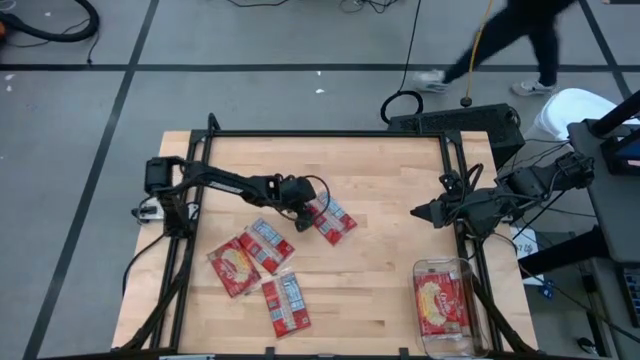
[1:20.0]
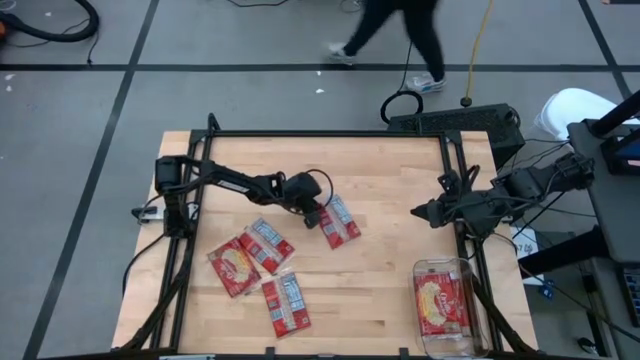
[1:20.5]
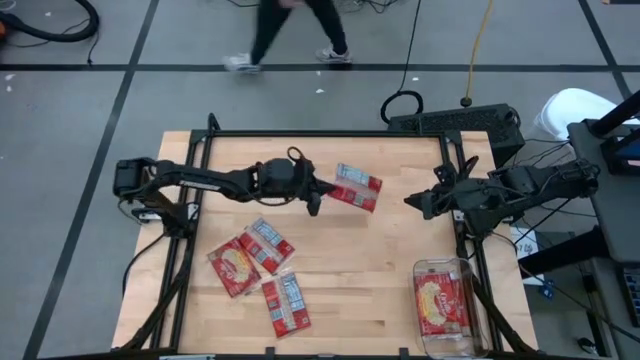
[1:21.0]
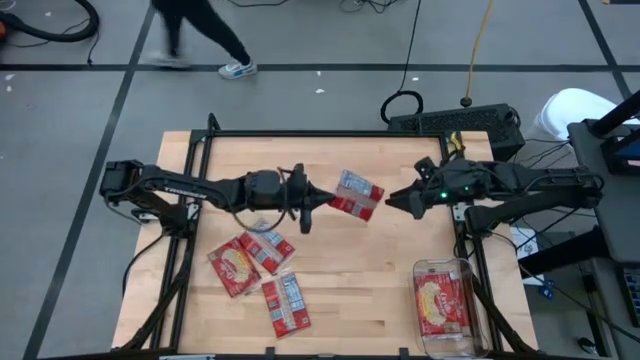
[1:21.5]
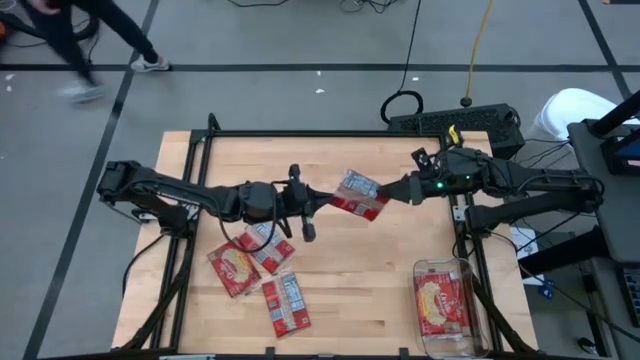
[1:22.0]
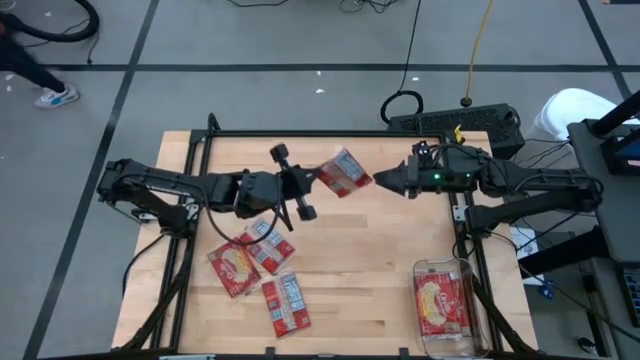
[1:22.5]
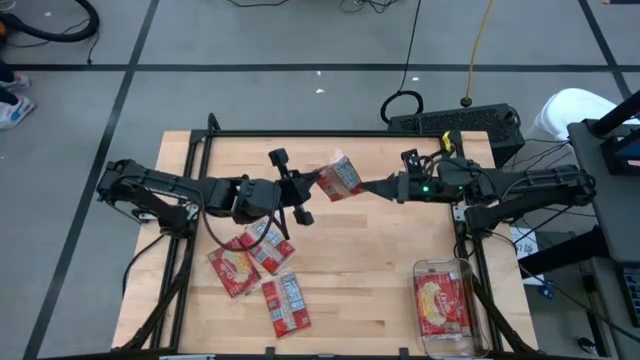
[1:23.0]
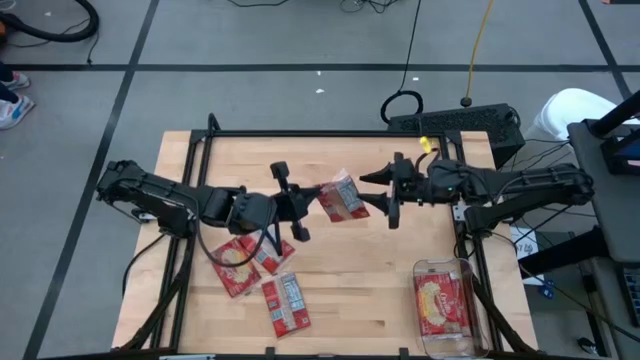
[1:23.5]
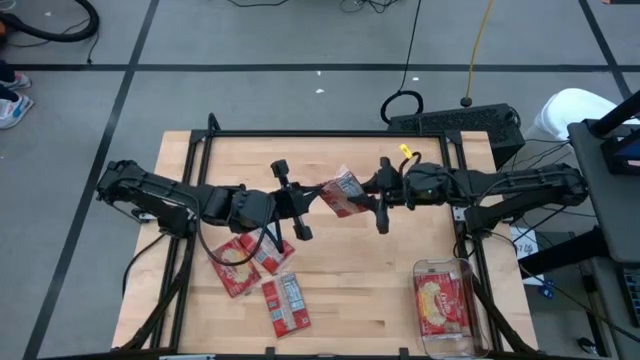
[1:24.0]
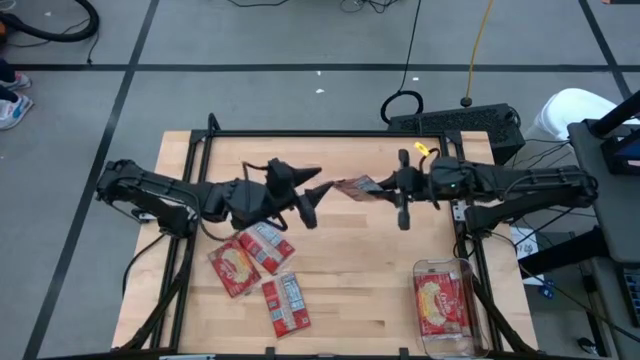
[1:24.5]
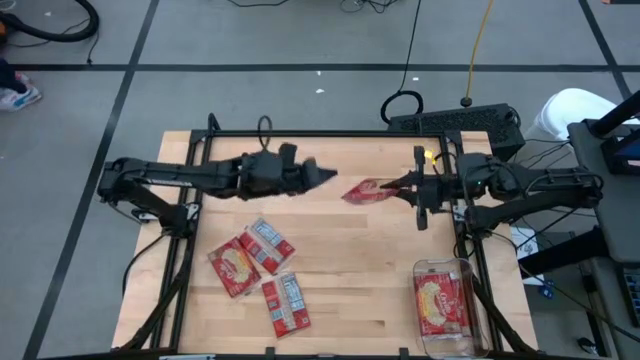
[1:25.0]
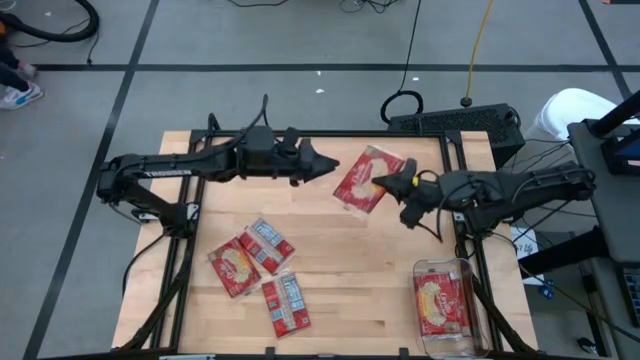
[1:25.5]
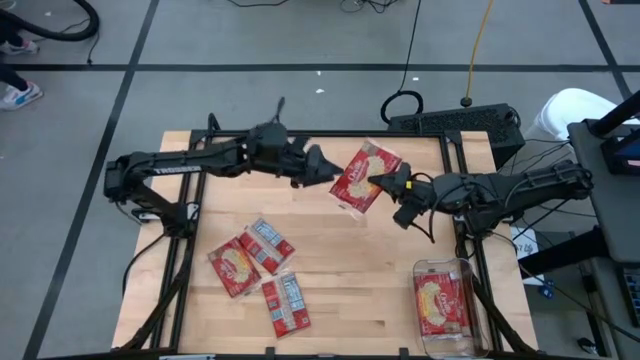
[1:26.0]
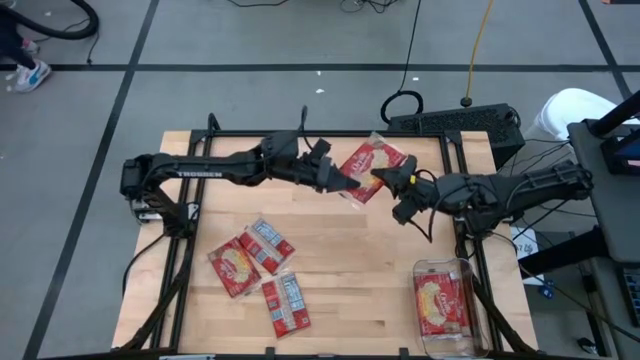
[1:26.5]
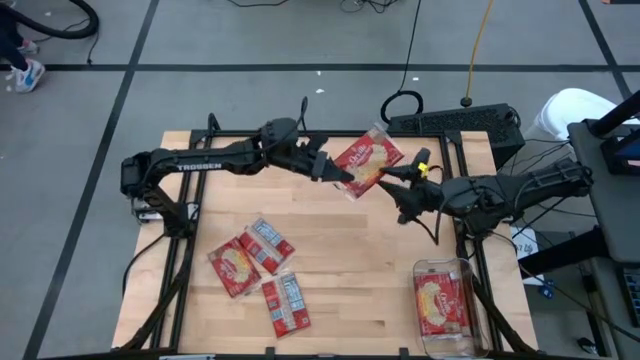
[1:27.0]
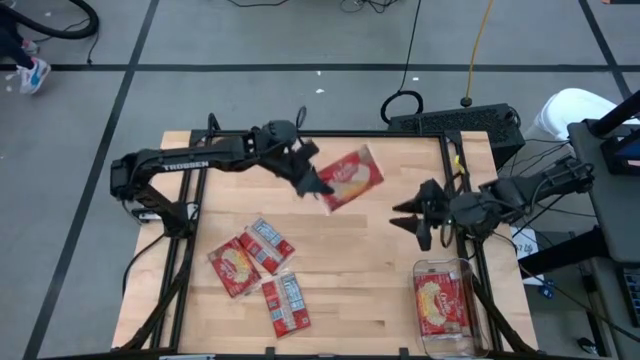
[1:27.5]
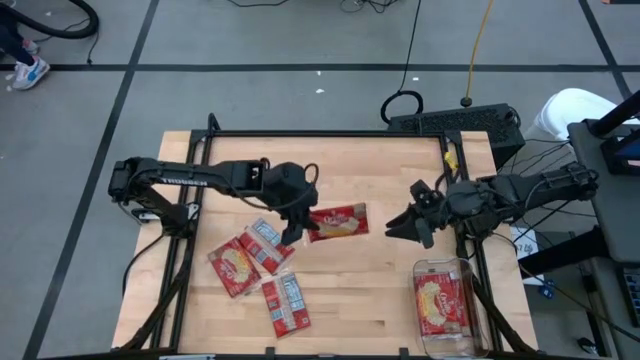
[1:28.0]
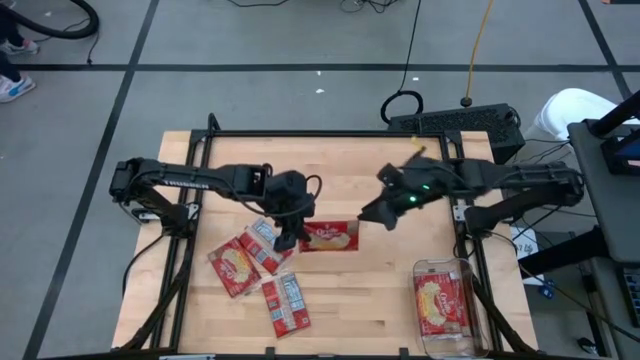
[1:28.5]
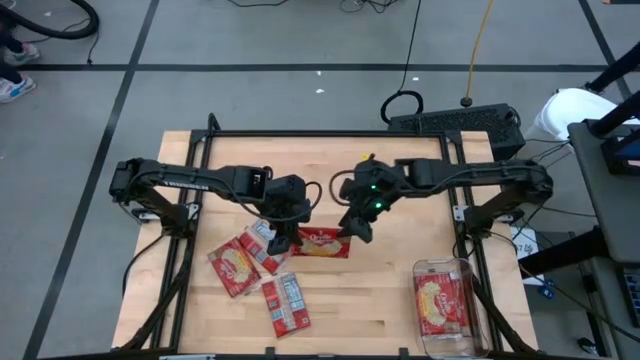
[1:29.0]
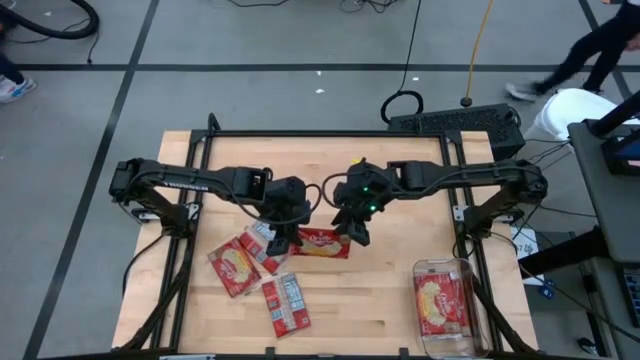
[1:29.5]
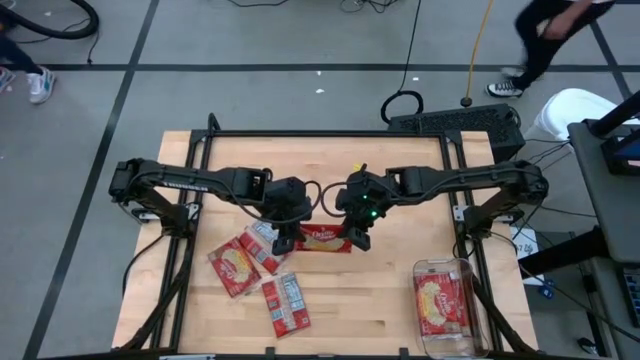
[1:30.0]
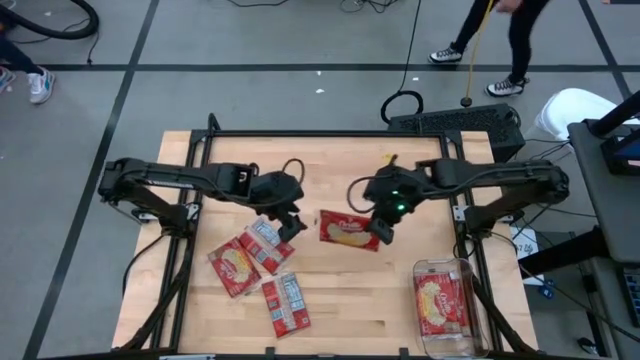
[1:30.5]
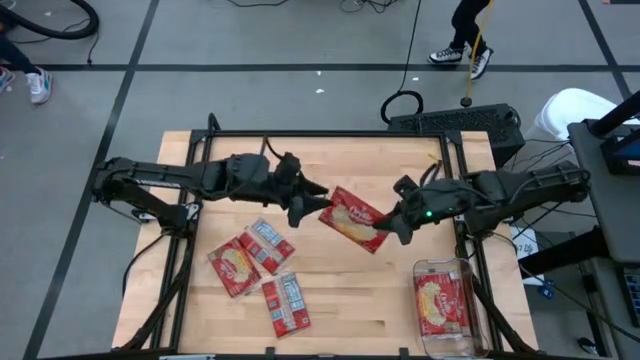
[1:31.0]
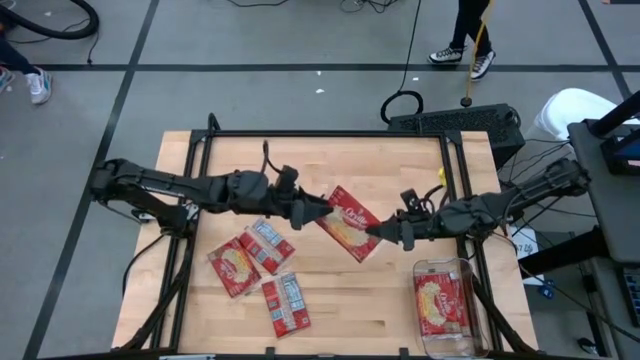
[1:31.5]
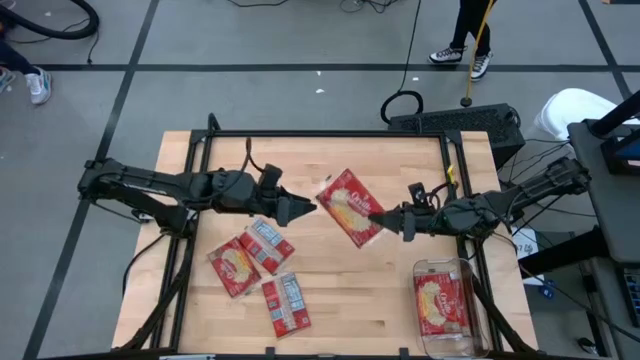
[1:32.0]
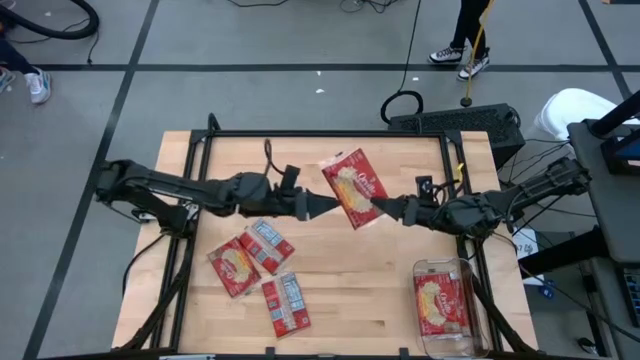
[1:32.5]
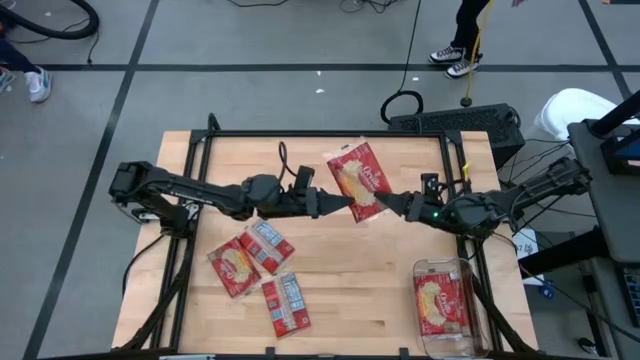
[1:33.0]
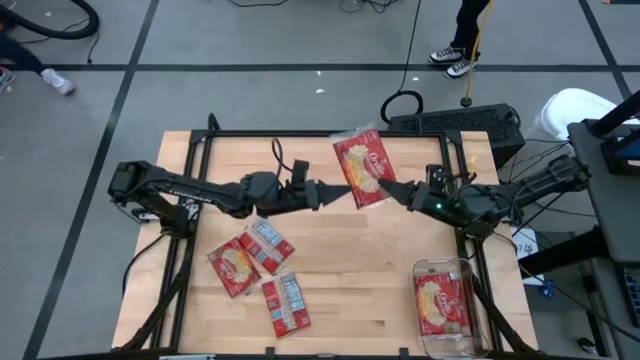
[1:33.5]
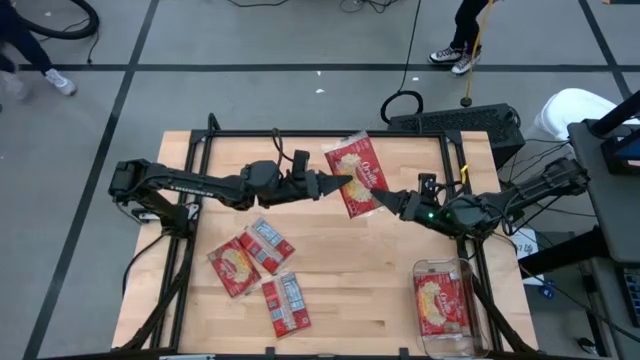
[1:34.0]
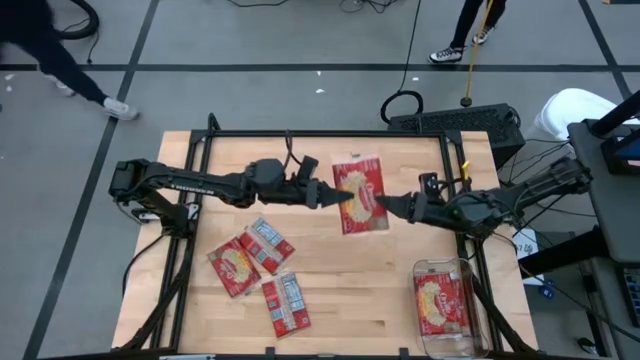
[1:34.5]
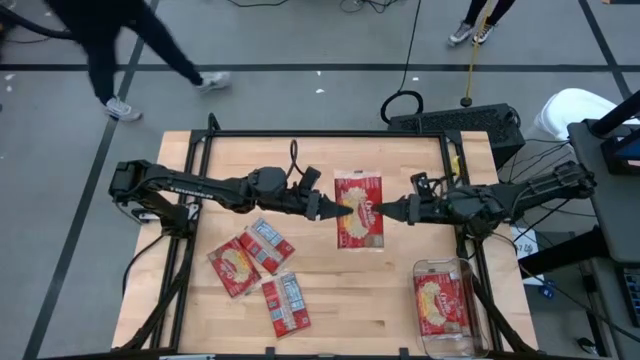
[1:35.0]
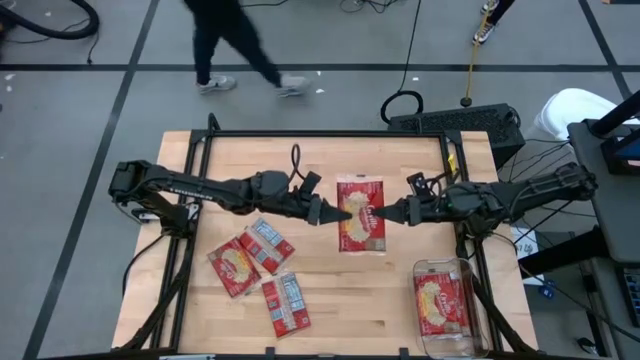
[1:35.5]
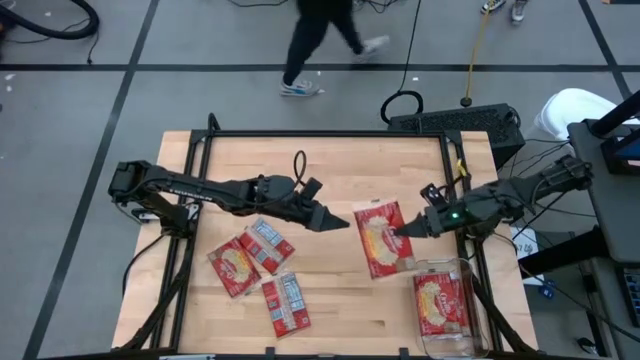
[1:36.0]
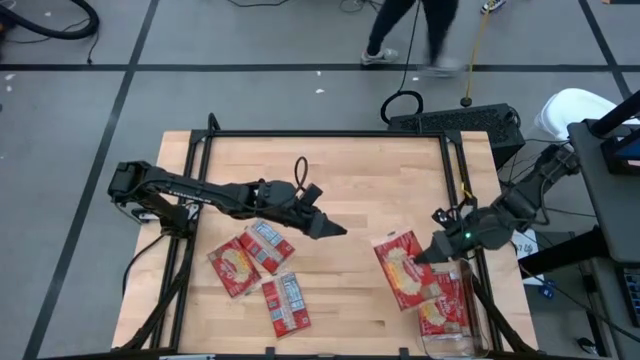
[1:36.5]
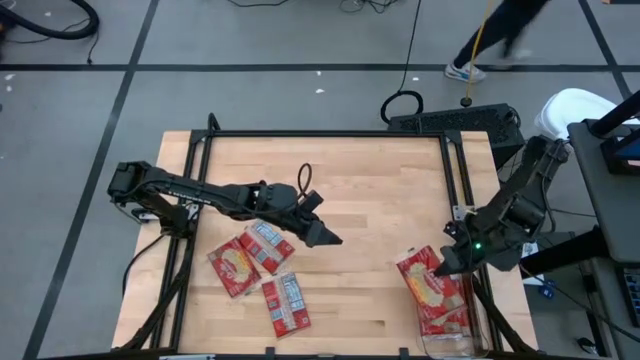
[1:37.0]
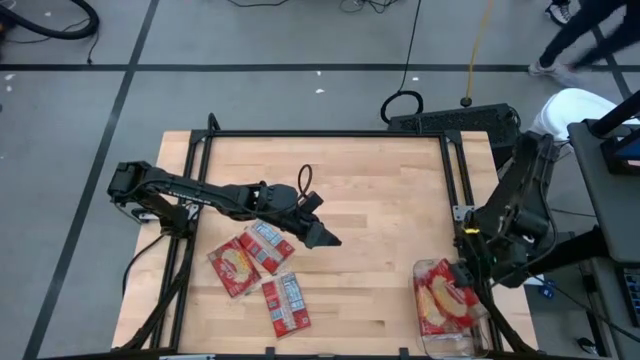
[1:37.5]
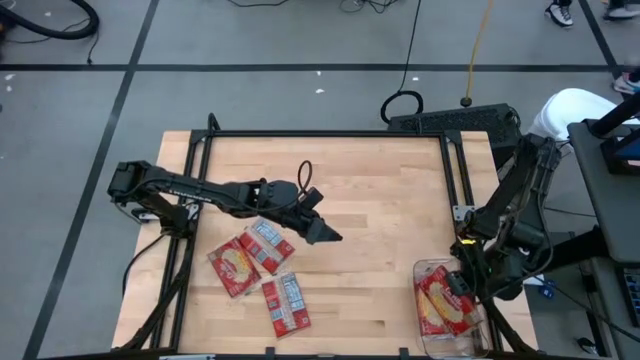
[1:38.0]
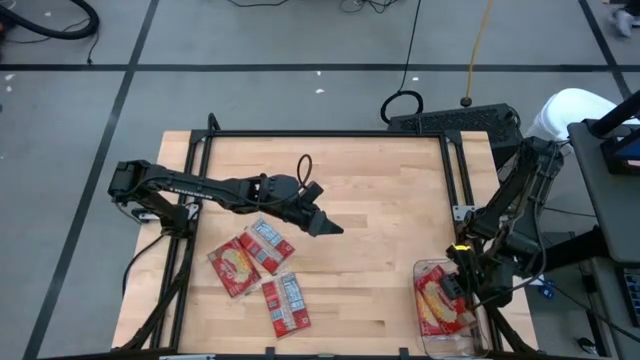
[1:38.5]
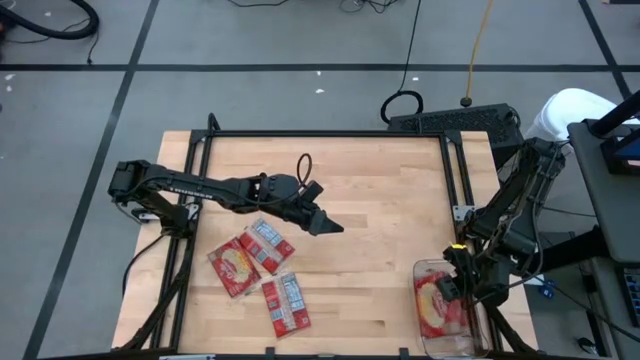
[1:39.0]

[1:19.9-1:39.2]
Task: Sort popcorn bags into baskets
Put the popcorn bag into the transparent bin

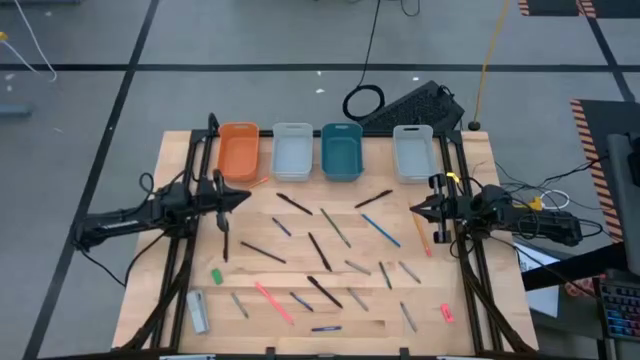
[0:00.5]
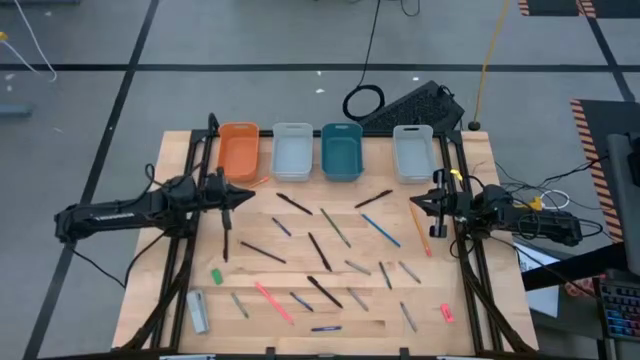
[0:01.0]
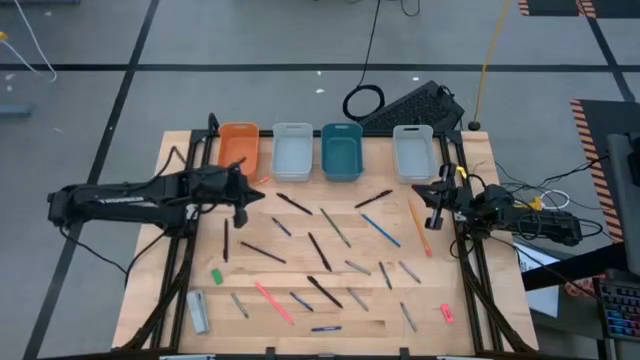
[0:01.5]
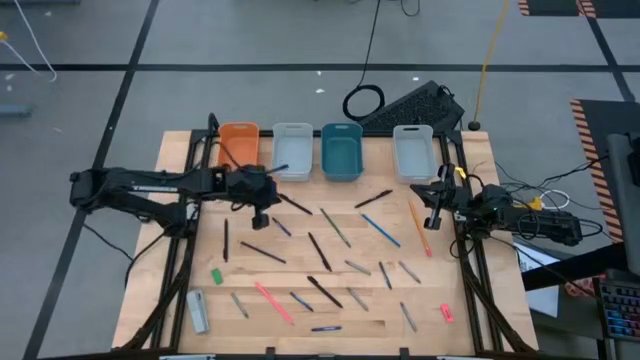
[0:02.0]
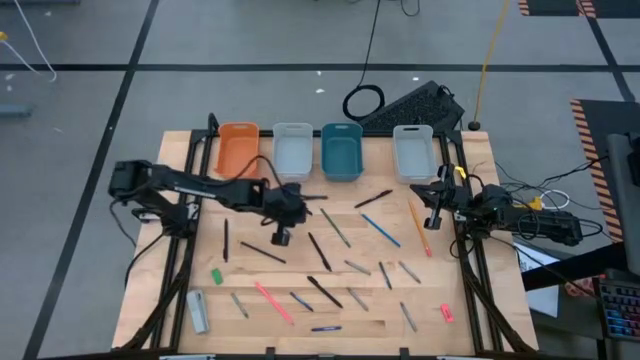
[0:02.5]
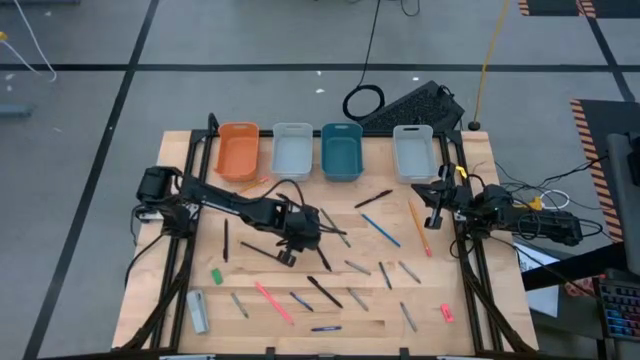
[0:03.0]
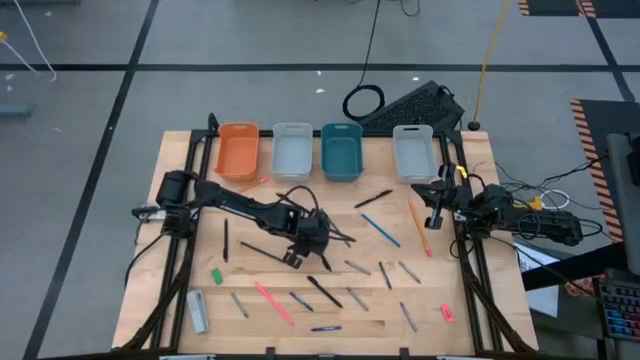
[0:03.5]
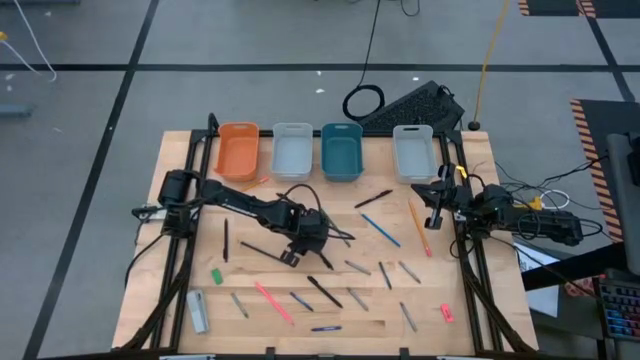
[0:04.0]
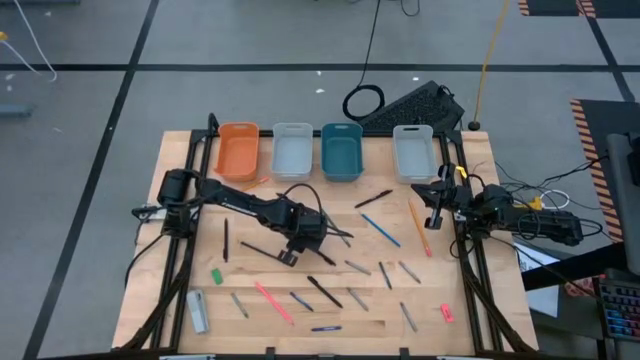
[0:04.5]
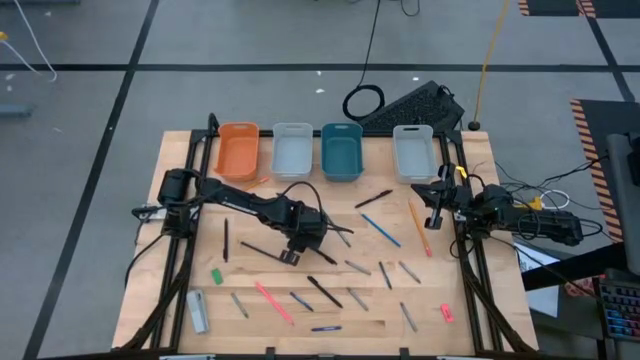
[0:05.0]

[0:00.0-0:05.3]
Task: Sort crayons/erasers/pens/pencils in bins
Put the black pen into the left gray bin
